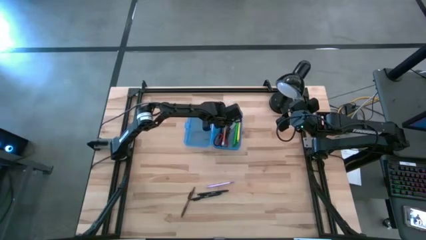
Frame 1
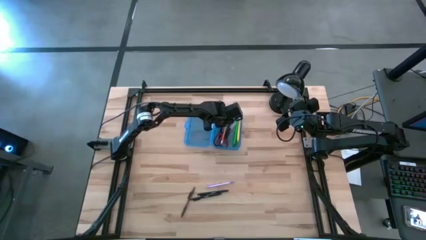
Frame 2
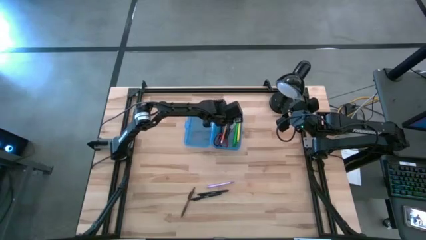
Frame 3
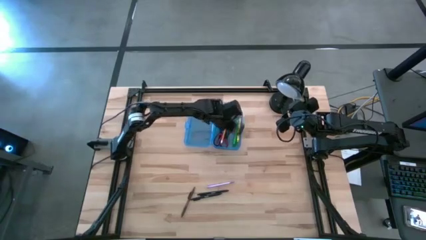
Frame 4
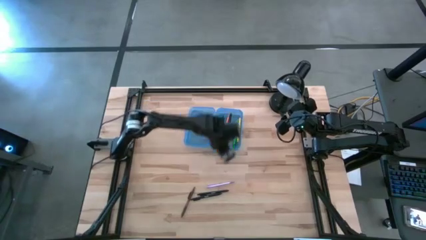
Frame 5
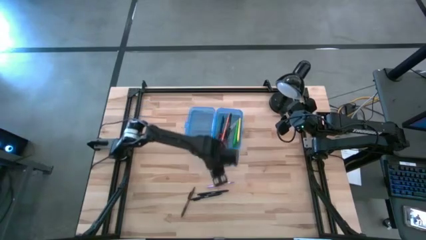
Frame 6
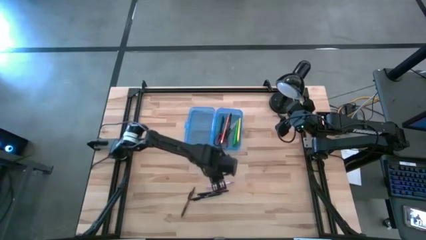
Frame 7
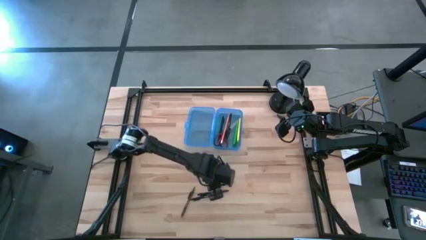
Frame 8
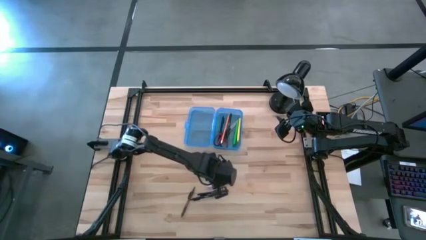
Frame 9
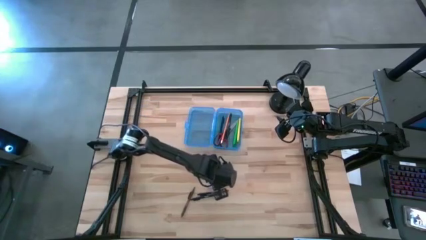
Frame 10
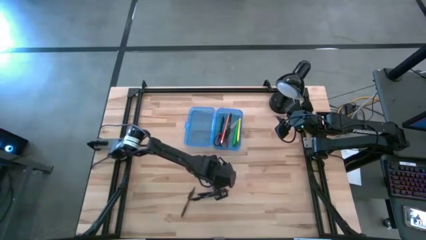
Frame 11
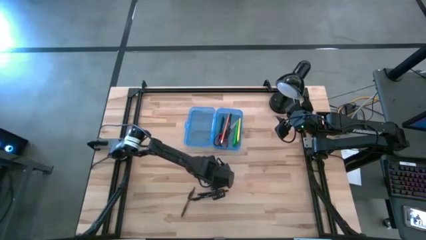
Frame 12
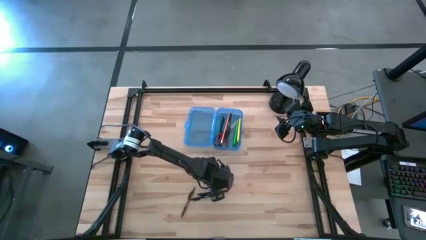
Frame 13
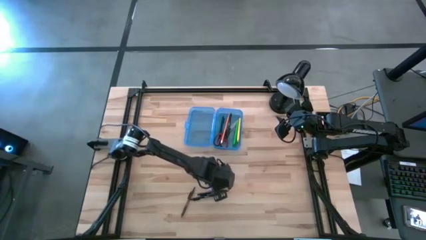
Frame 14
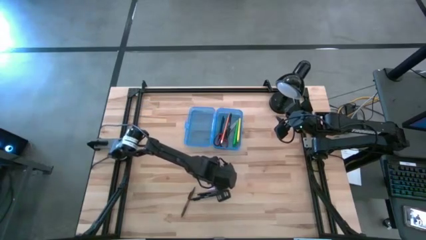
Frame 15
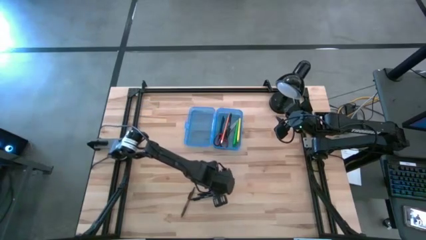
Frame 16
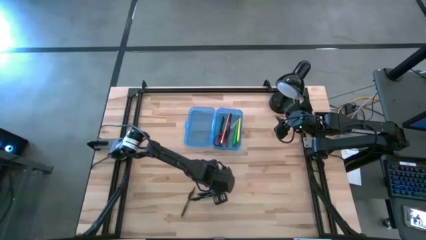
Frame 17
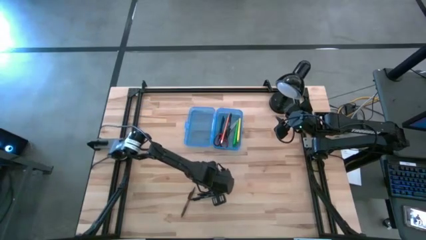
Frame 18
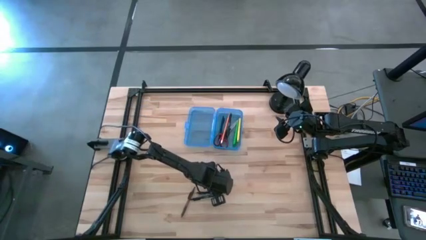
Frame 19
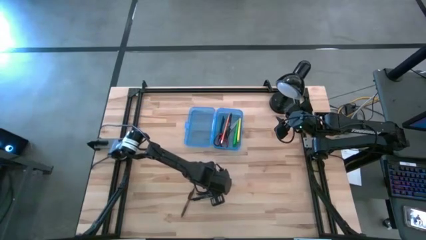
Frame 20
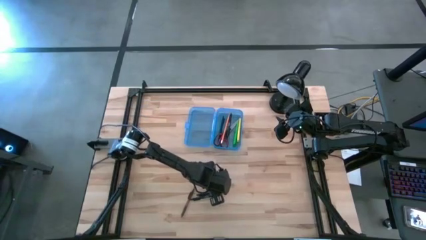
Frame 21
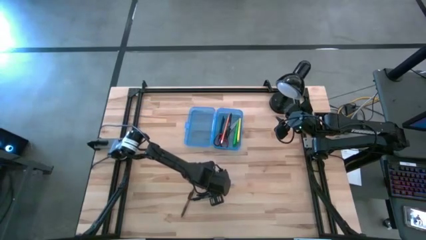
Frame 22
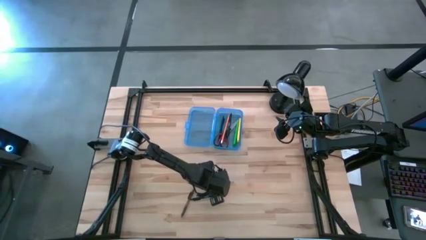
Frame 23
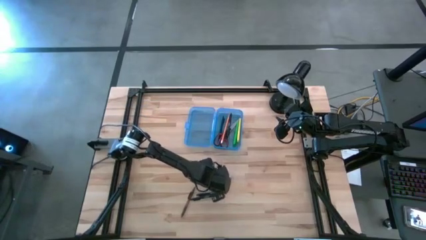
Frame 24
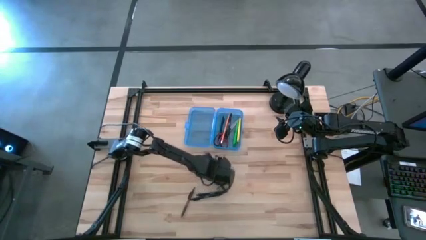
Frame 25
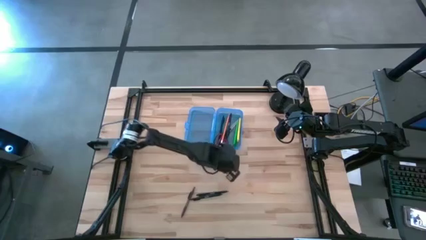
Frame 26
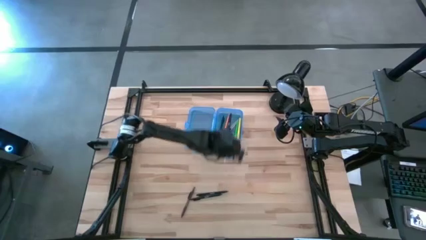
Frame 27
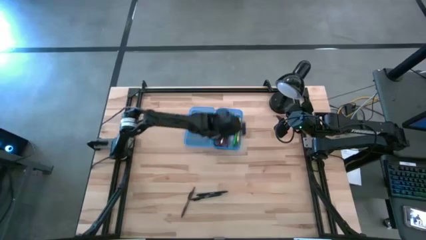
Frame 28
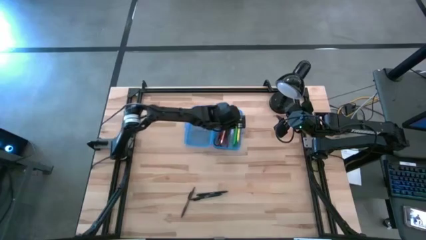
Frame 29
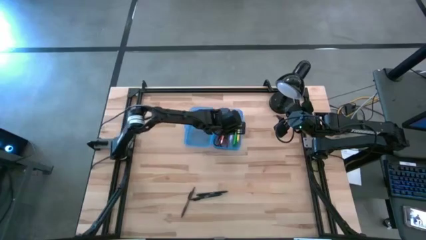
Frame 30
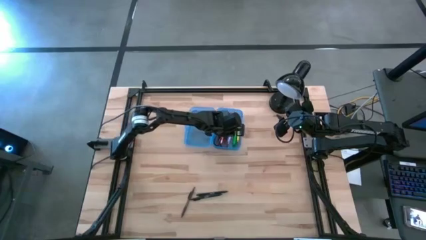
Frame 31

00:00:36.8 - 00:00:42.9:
Task: Pick & place school supplies into a supply box
Put the purple pen into the blue box

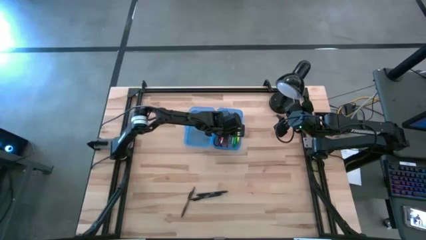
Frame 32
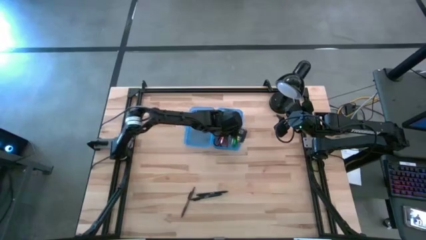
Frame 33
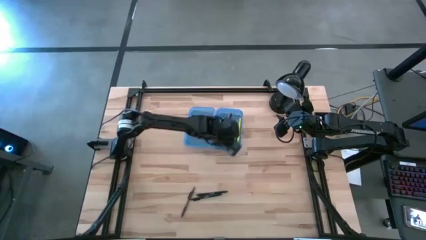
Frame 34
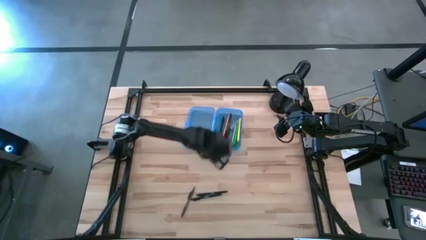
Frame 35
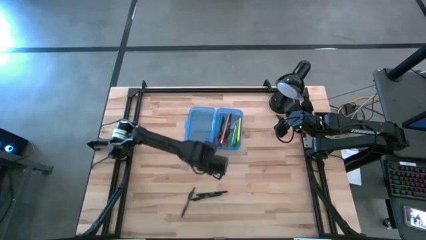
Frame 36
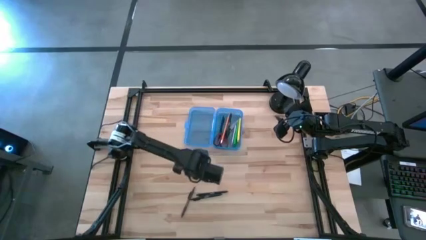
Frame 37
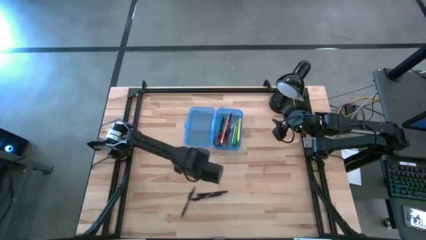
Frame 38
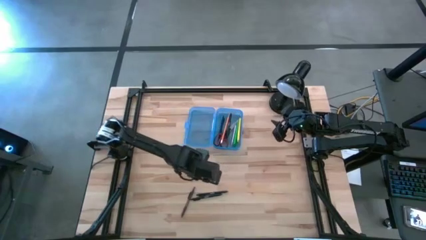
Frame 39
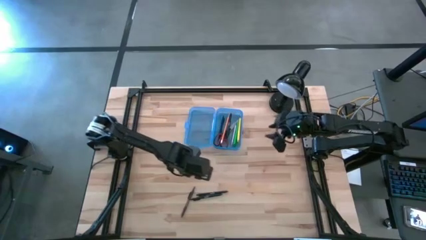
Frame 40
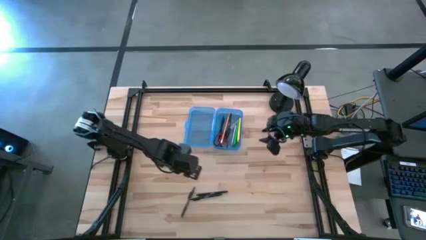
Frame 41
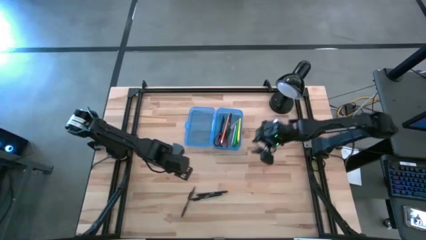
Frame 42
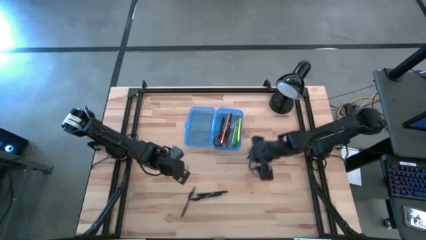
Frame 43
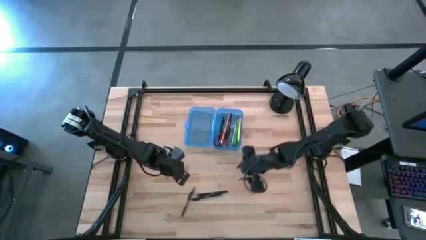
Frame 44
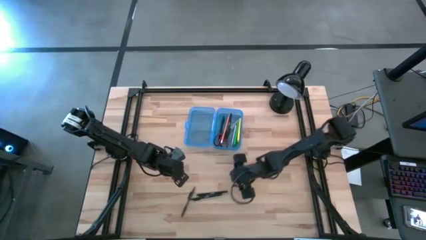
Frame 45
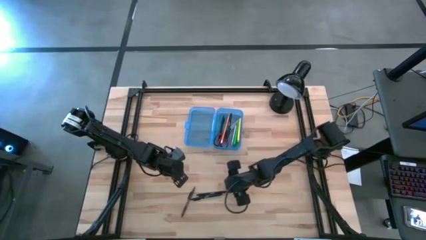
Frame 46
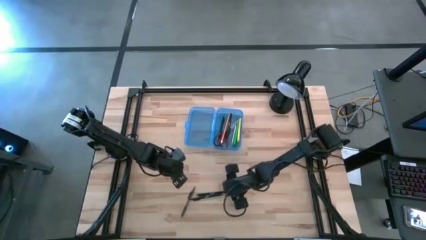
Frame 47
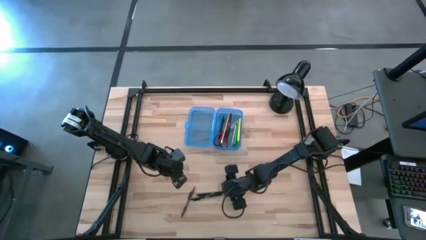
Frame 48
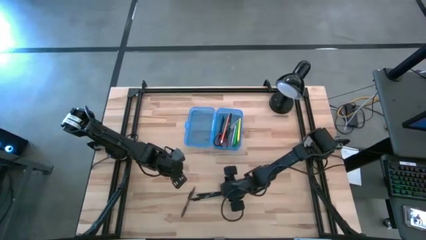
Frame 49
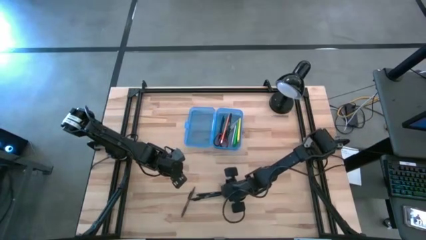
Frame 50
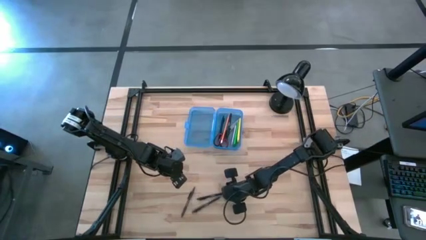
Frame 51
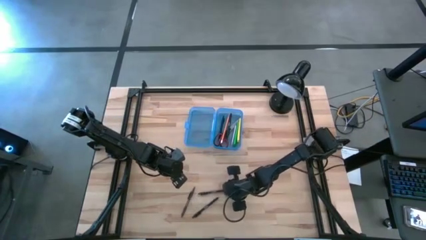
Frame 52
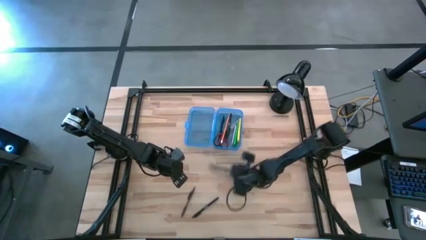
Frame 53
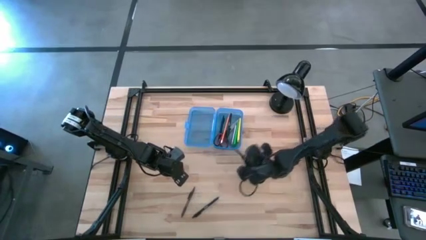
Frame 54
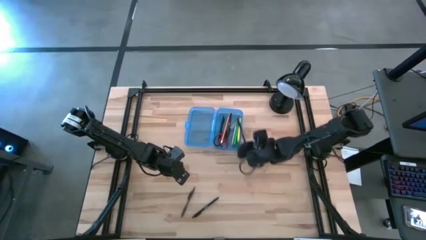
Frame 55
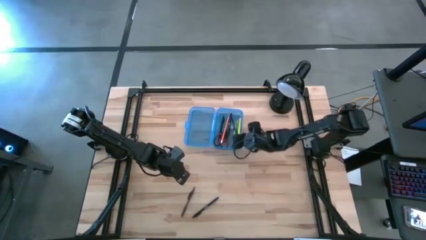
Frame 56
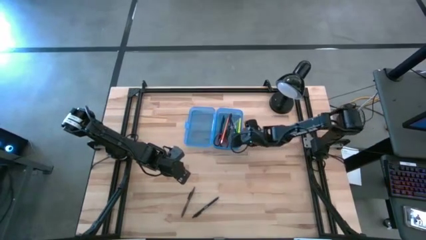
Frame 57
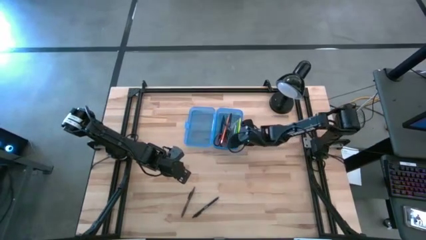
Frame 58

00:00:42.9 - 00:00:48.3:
Put the black pen into the blue box

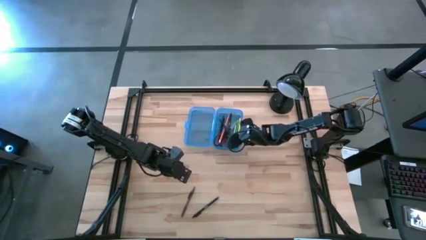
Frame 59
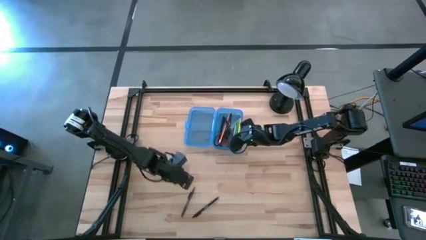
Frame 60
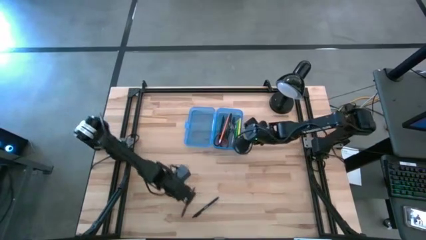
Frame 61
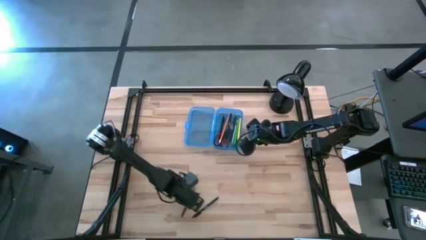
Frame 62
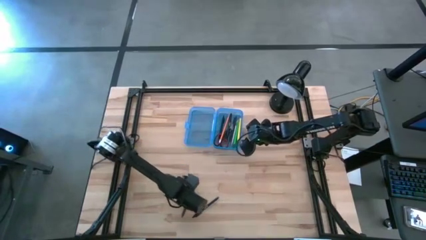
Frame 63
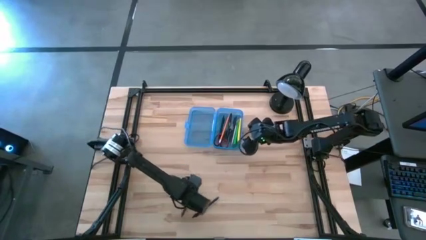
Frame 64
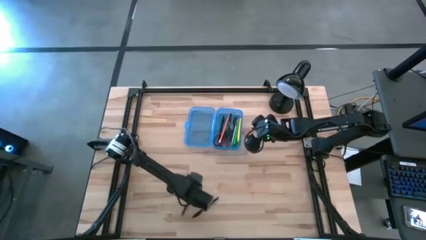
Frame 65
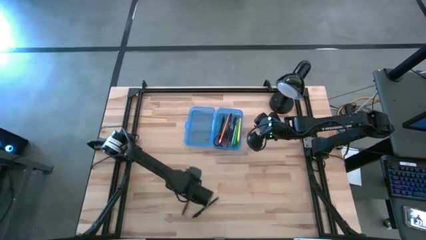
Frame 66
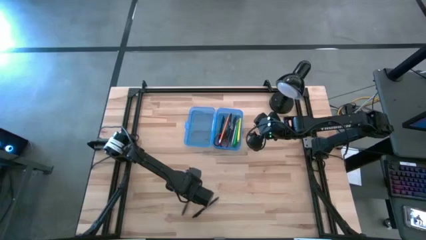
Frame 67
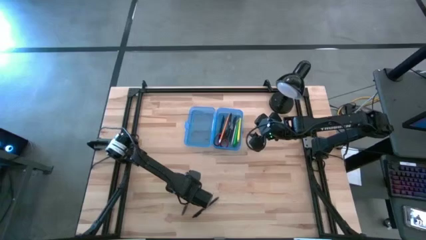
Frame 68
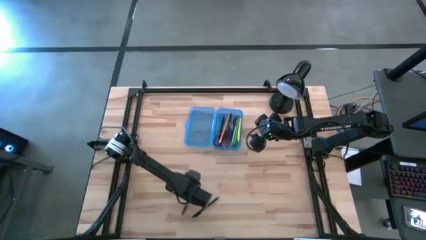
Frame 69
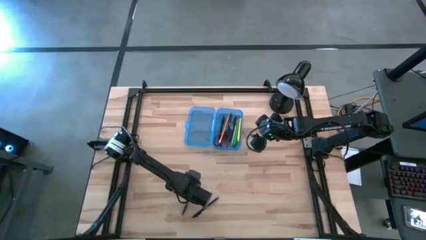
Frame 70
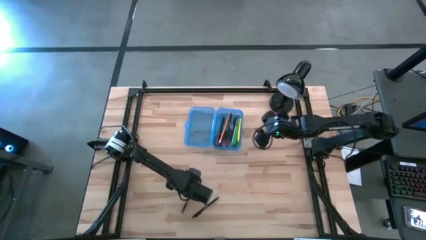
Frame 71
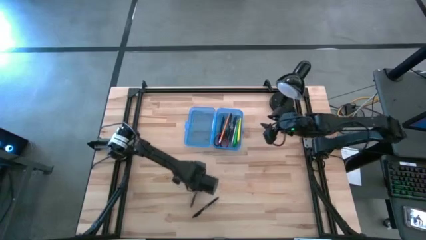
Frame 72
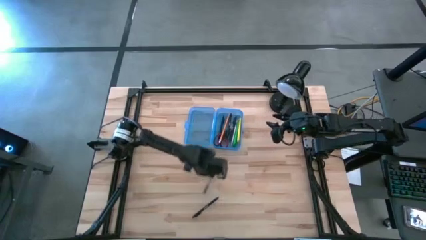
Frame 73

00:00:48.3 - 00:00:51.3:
Put the brown pen into the blue box

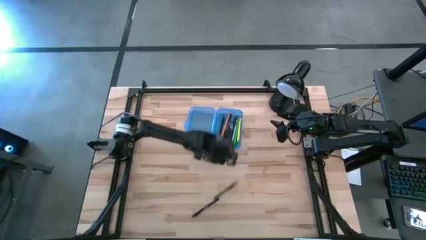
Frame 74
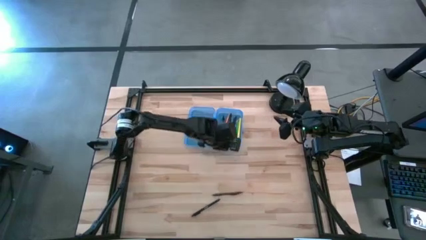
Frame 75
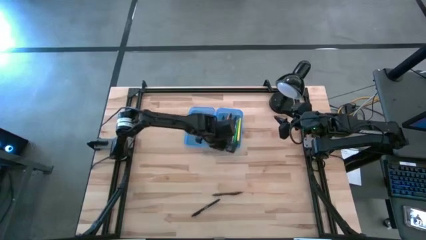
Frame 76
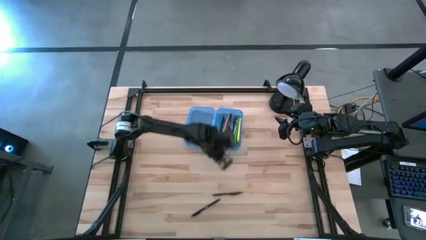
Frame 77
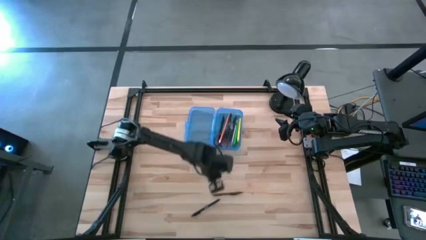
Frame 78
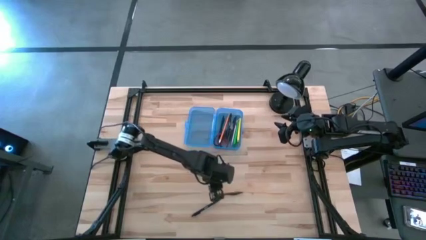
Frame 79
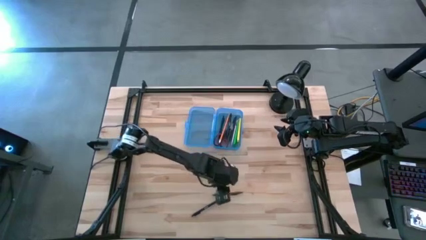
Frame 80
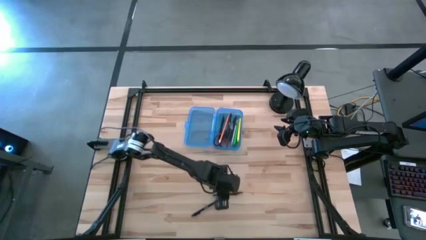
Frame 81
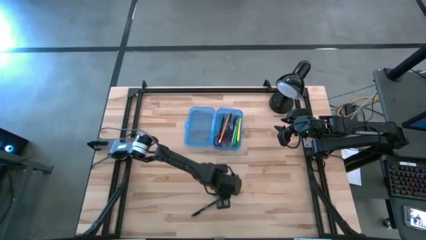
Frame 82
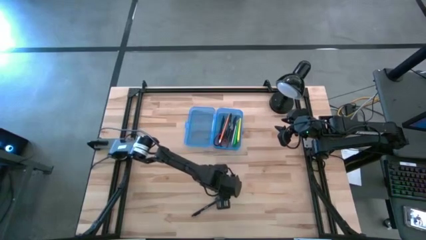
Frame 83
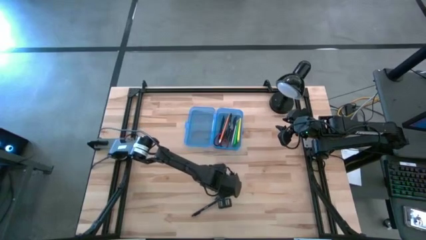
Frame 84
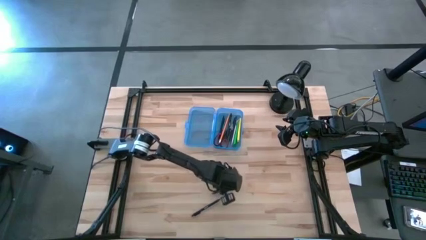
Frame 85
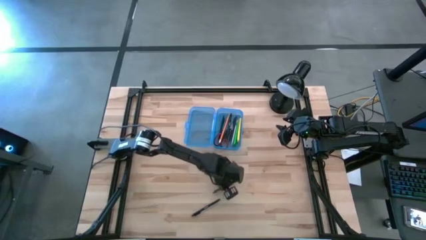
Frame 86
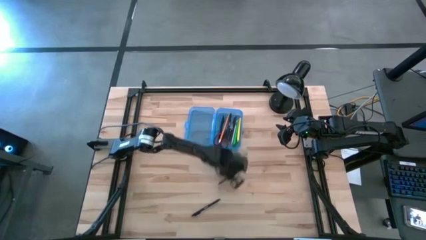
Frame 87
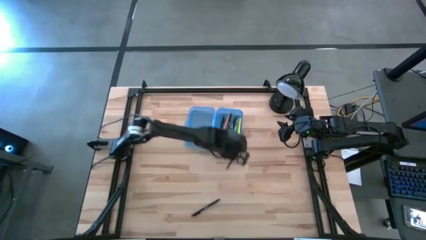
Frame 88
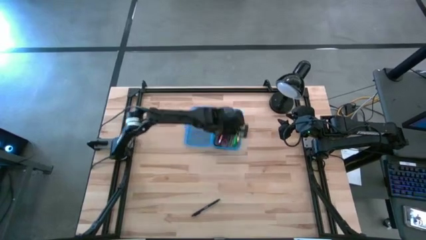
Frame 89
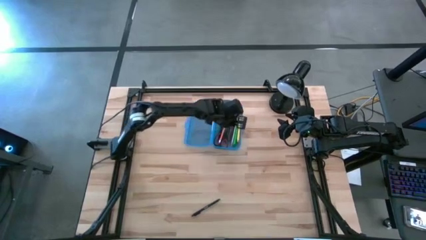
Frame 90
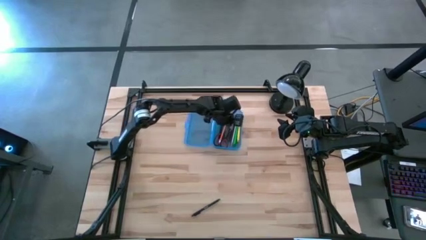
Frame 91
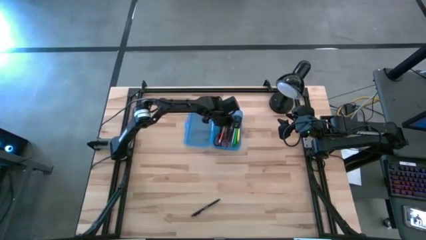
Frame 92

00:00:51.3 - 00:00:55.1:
Put the brown pen into the blue box
